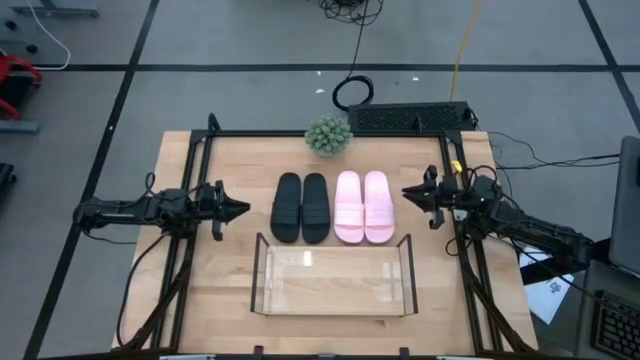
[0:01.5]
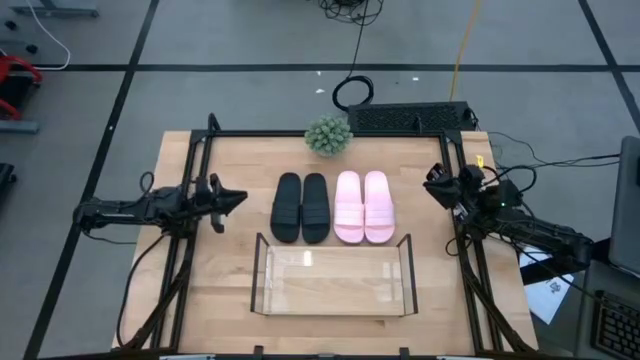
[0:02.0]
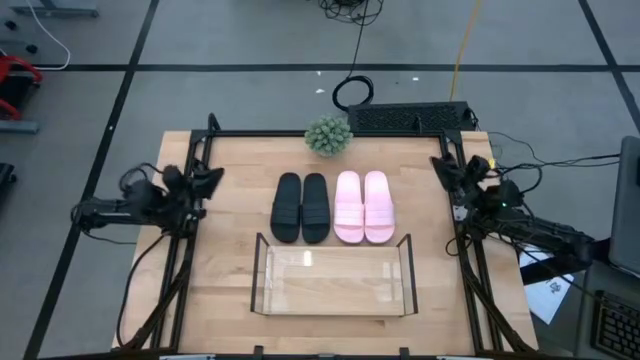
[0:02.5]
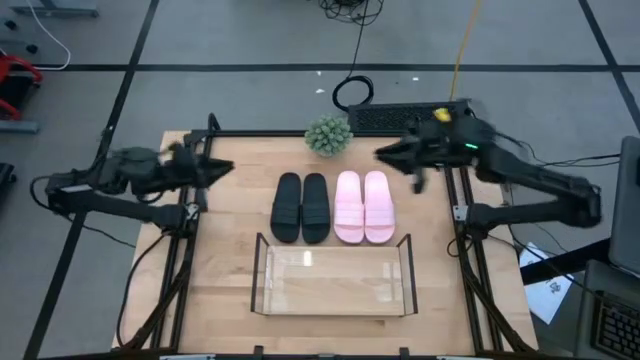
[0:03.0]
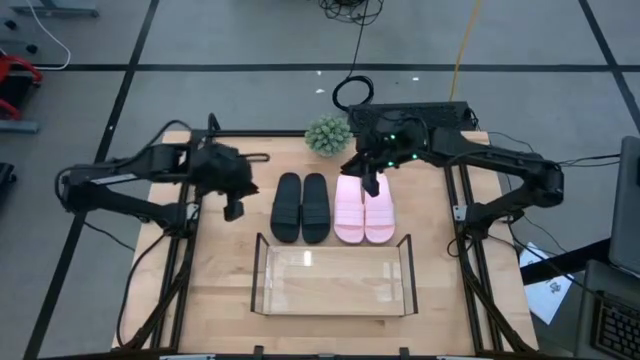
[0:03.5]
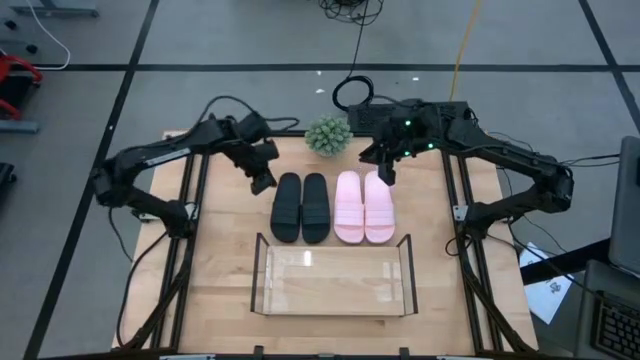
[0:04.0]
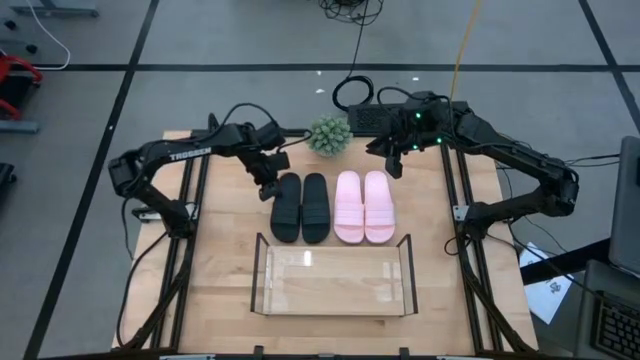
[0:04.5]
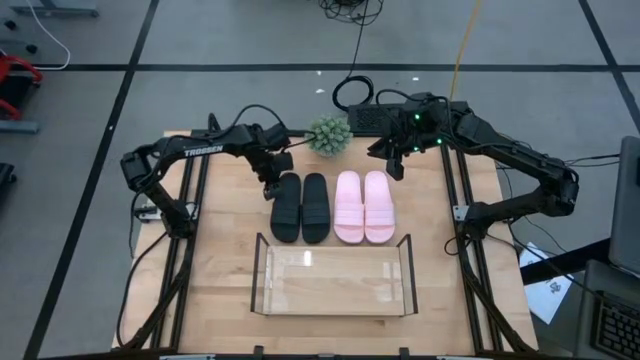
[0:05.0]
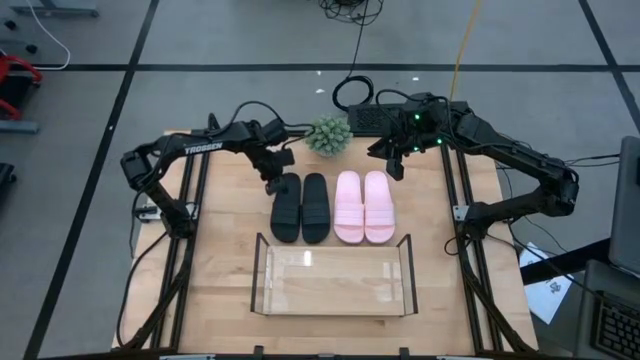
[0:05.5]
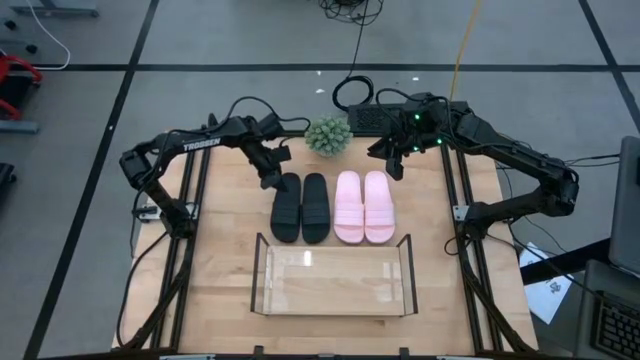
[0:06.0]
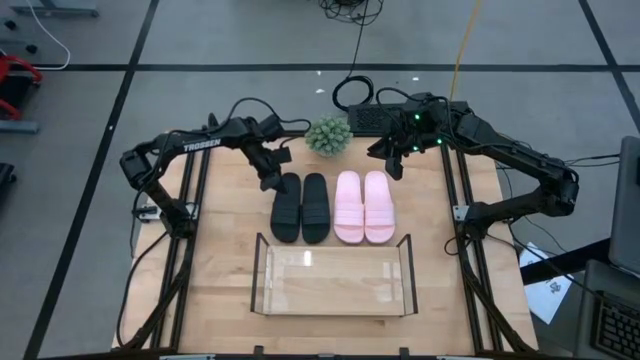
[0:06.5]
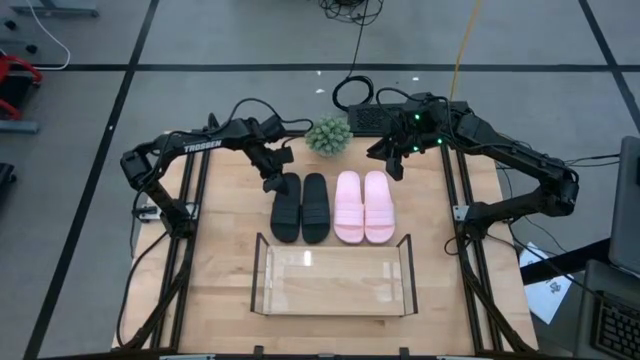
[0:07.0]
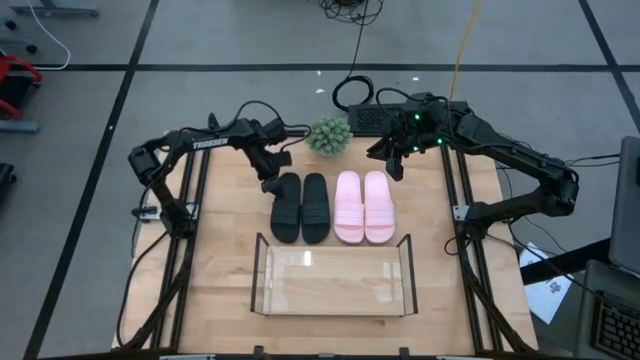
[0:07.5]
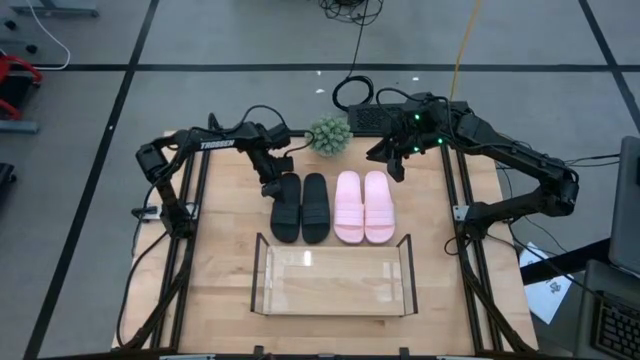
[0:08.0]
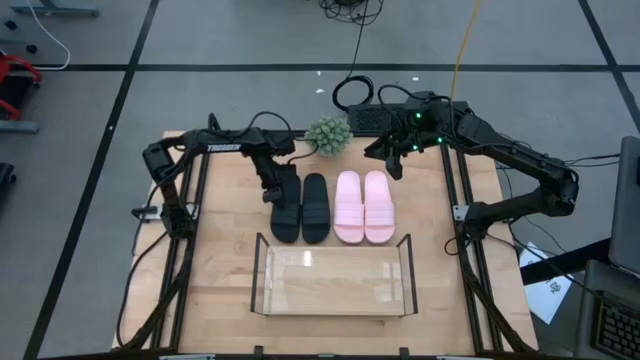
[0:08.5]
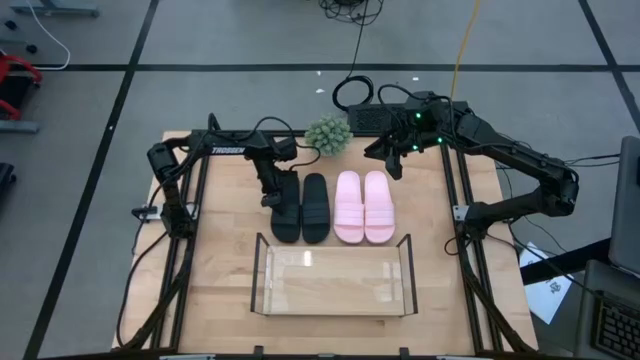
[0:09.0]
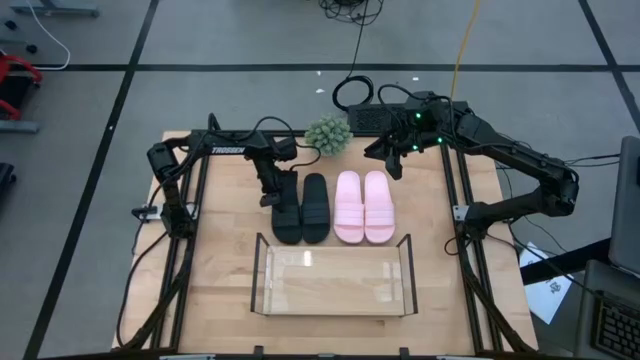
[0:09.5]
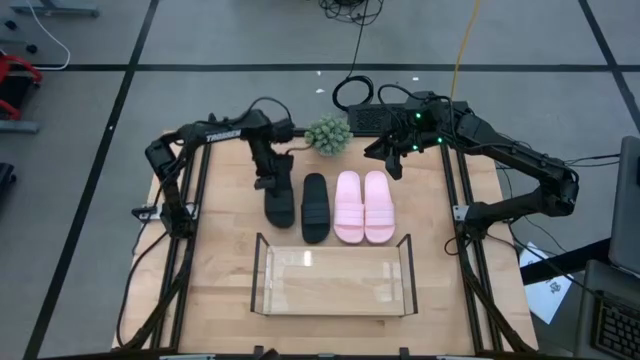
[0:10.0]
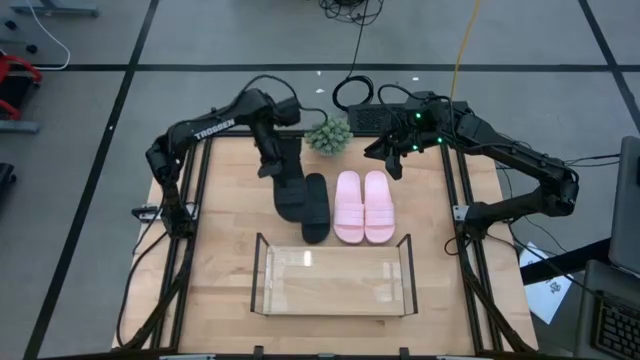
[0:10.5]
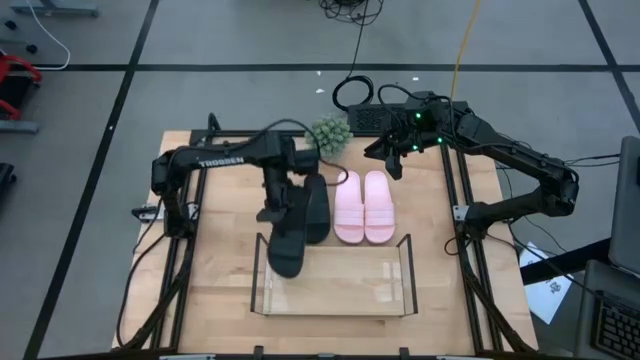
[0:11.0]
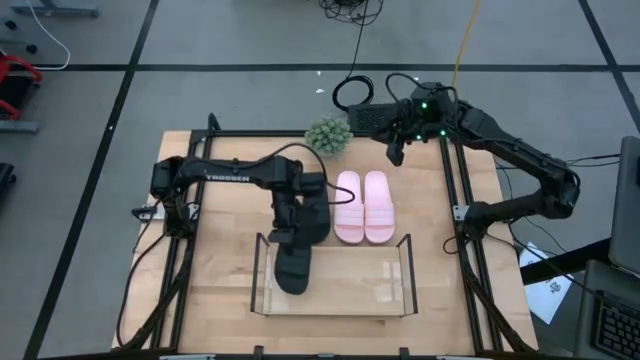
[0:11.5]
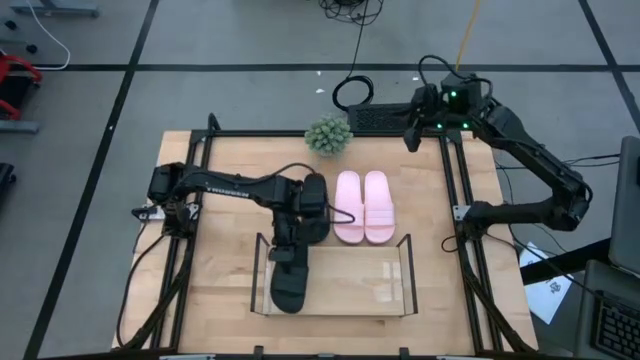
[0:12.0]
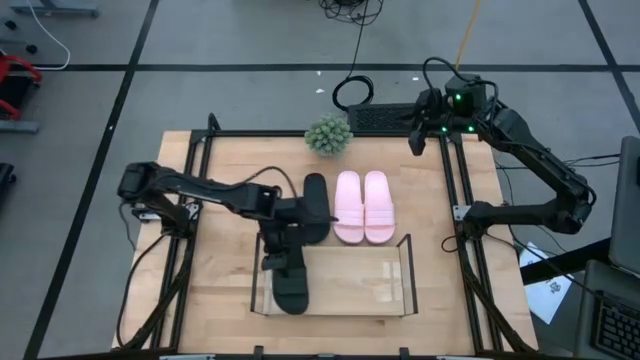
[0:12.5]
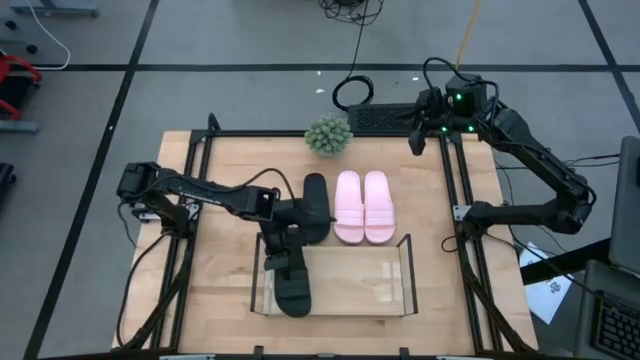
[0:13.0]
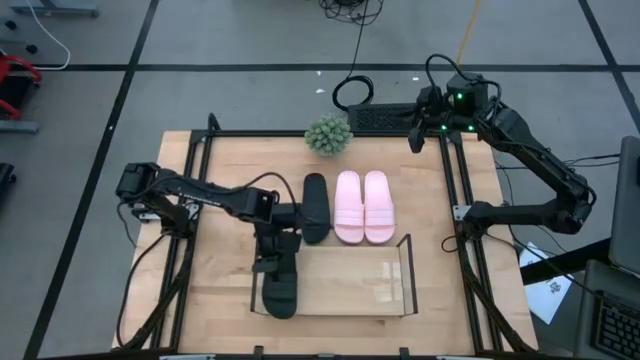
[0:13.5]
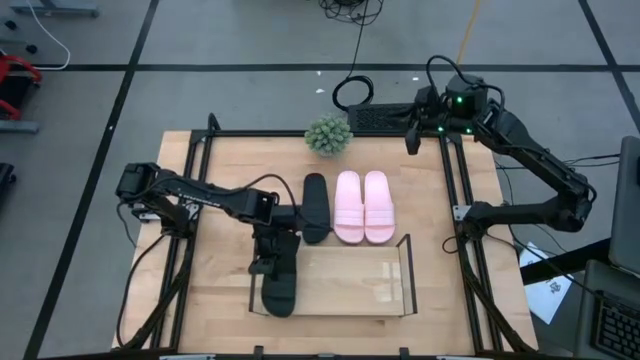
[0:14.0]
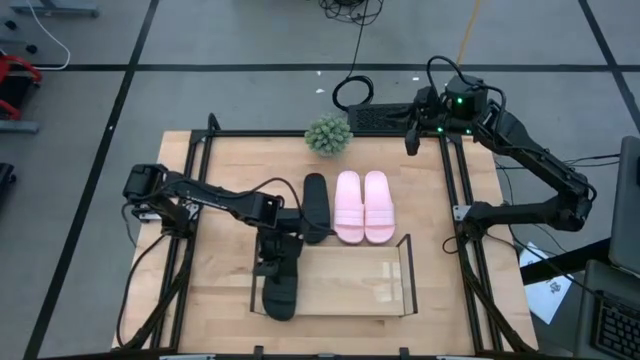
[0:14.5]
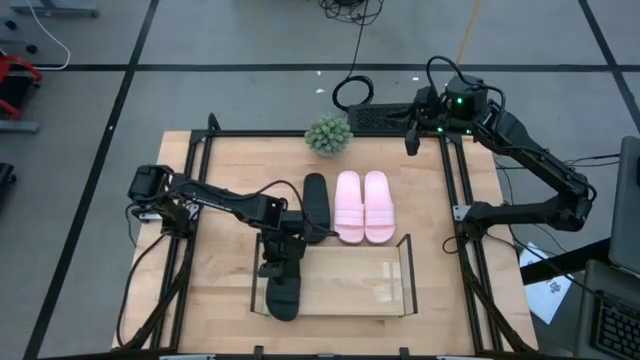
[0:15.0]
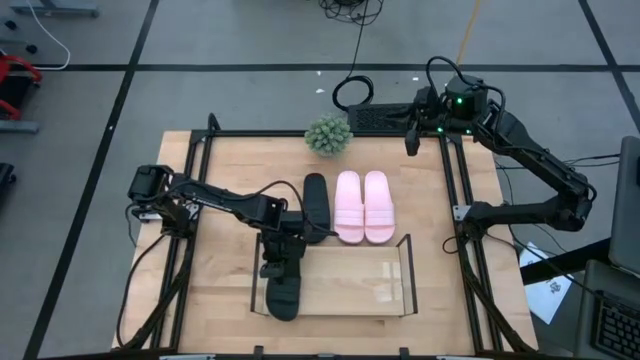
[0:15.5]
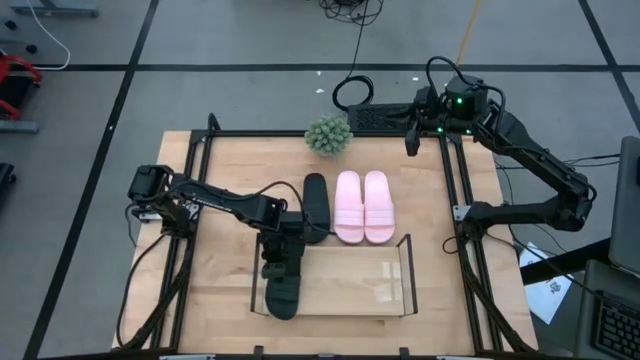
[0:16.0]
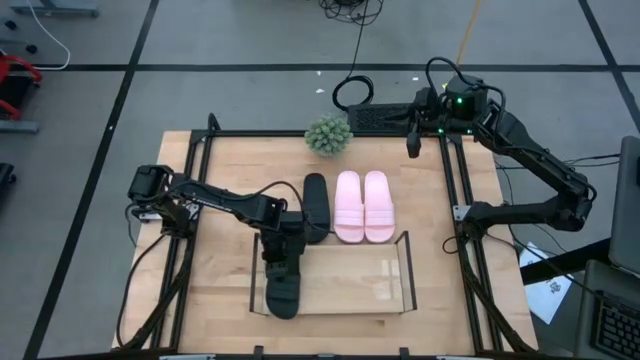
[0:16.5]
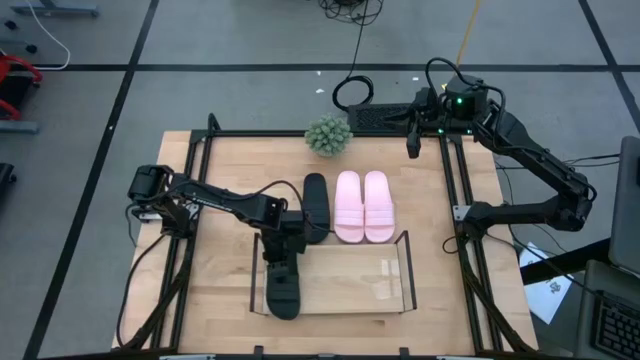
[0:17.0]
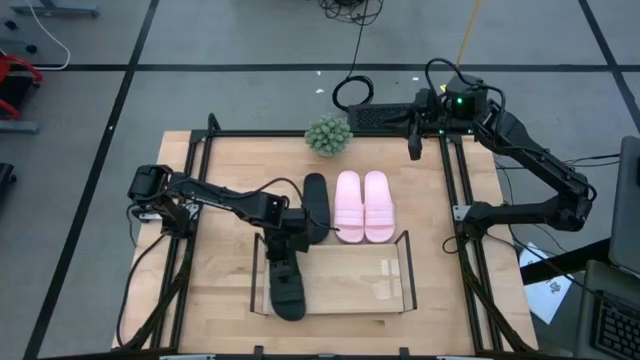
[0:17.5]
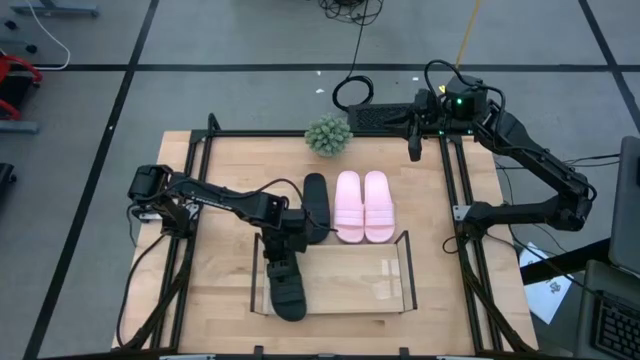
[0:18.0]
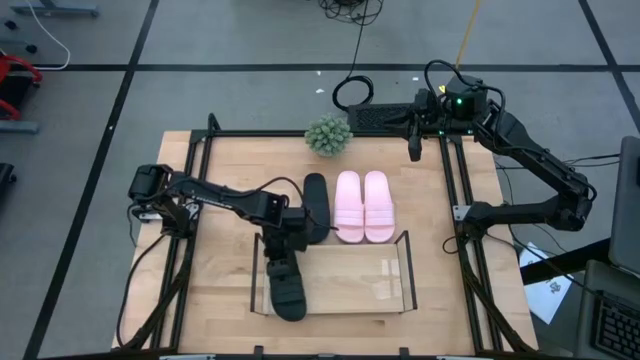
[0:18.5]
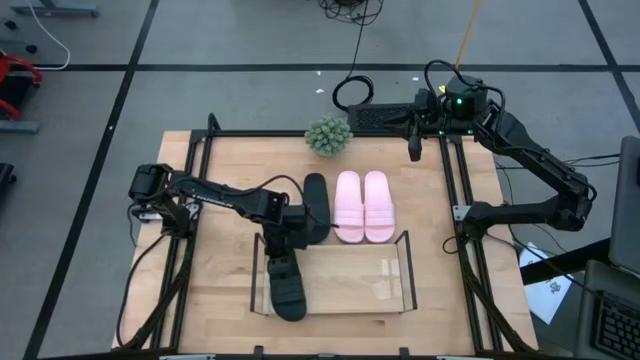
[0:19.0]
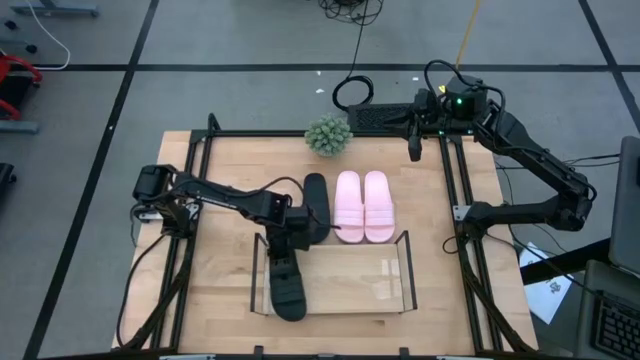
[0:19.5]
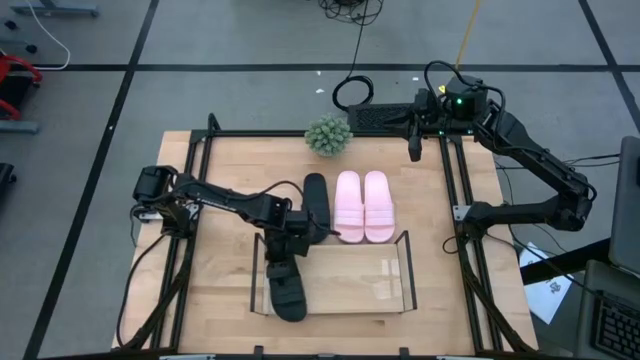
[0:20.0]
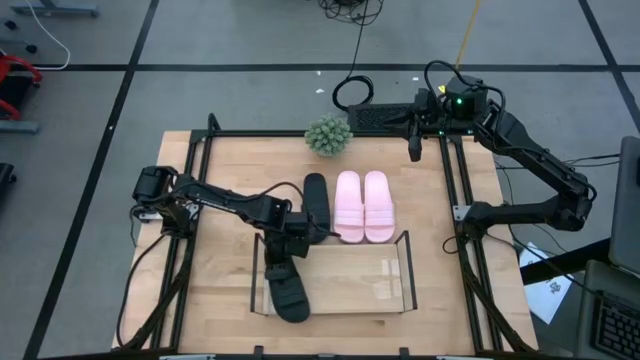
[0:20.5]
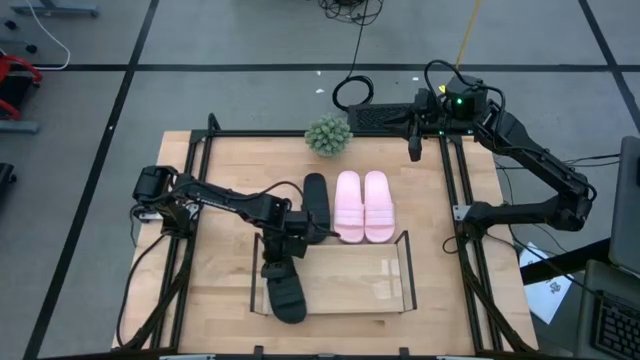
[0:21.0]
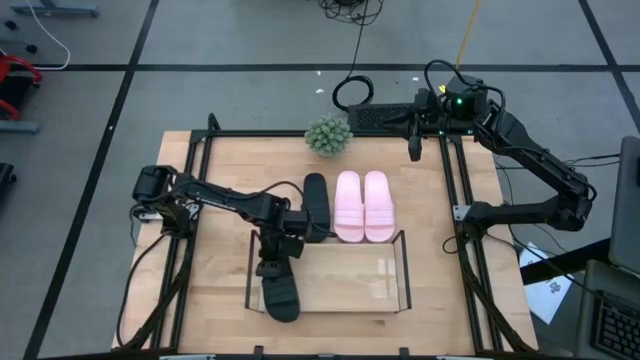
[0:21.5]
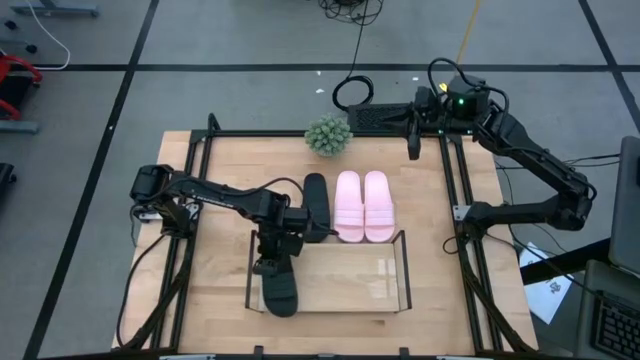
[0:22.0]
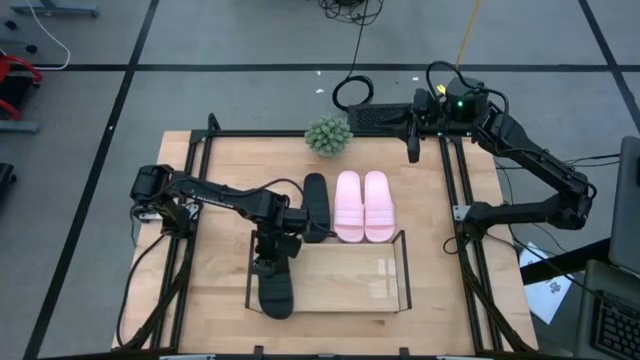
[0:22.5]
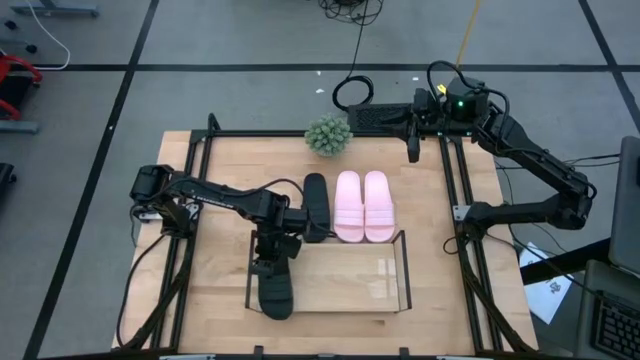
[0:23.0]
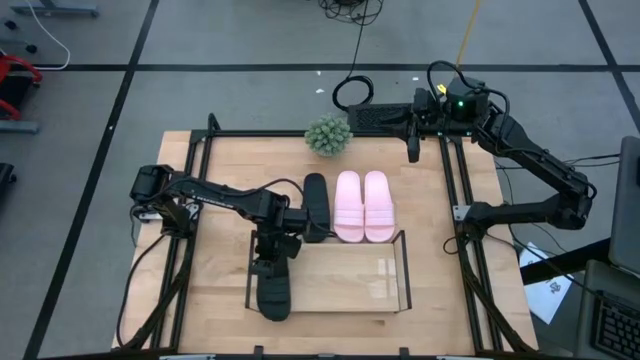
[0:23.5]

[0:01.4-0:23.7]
Task: Pick and place slides into the shelf
Put the left black slipper on the shelf
